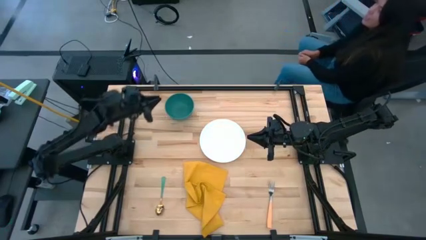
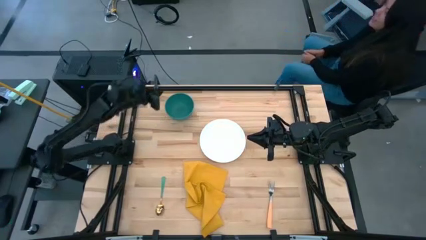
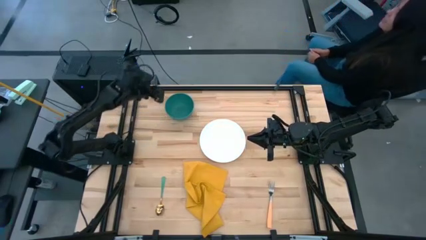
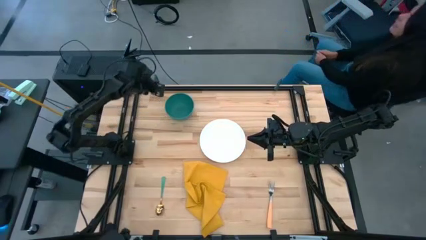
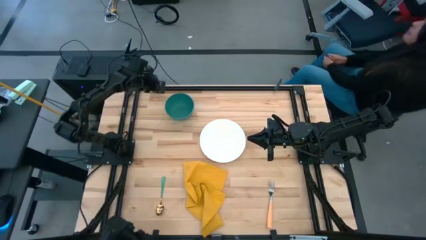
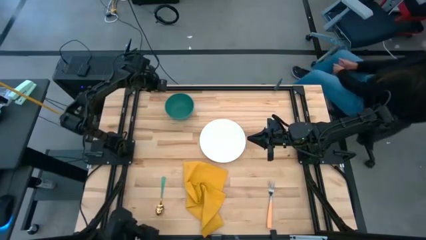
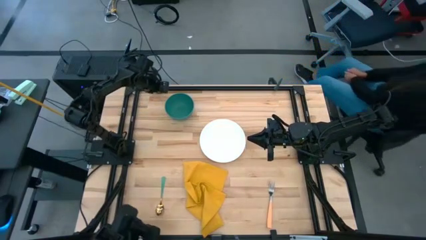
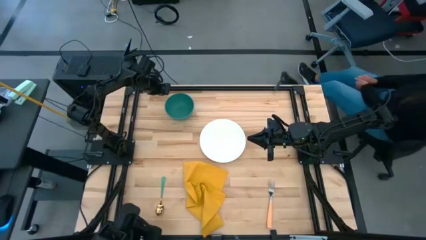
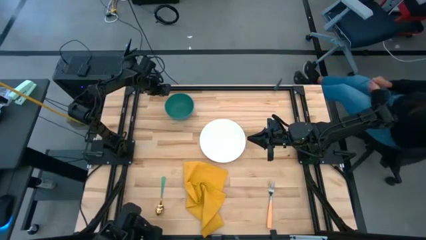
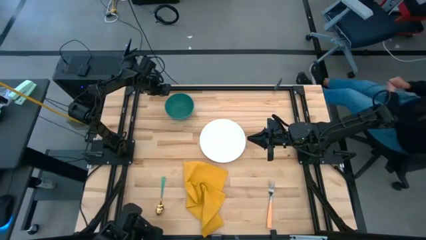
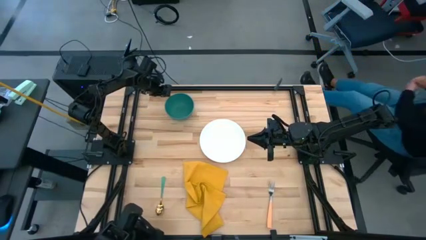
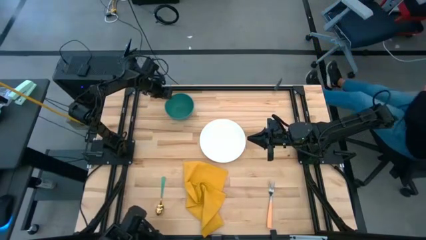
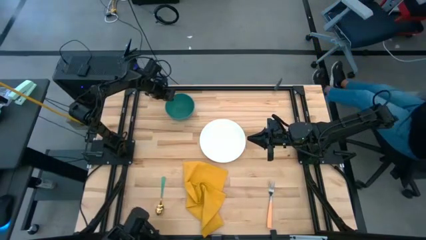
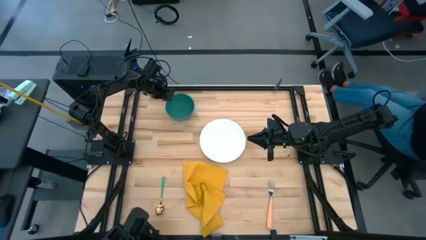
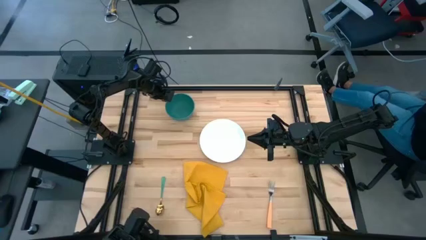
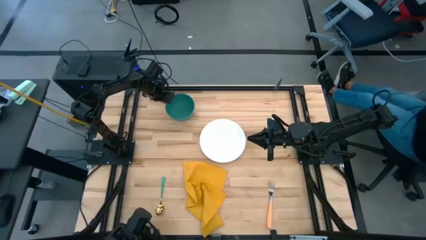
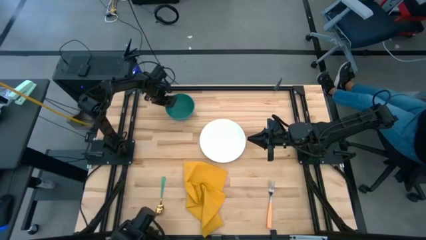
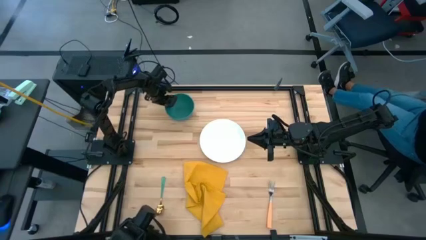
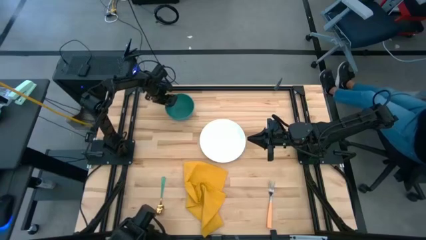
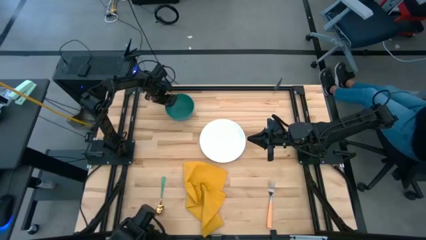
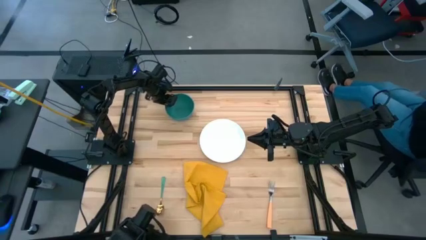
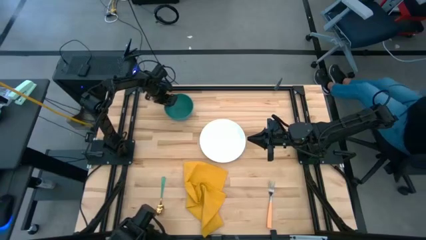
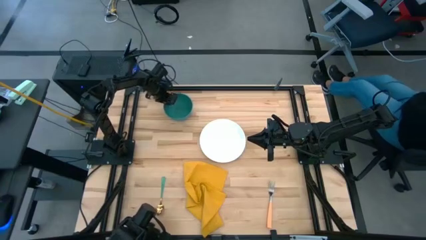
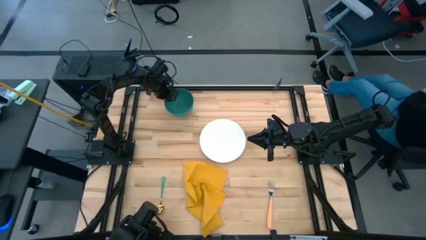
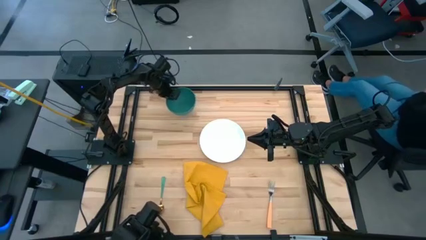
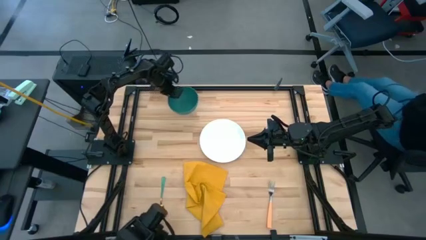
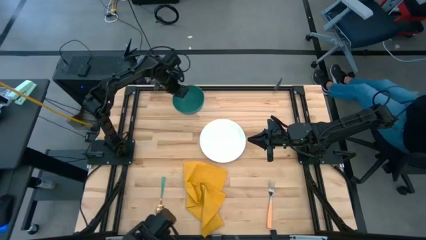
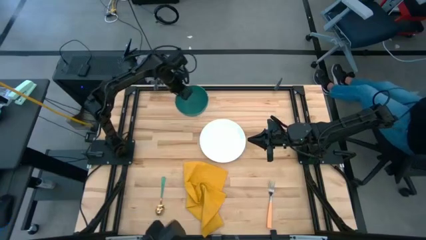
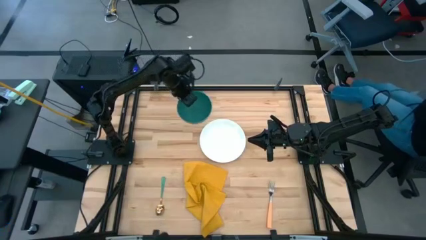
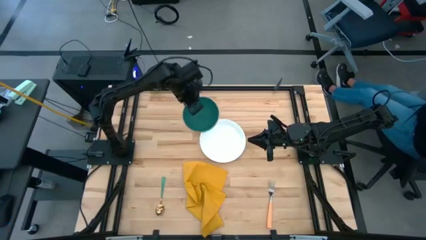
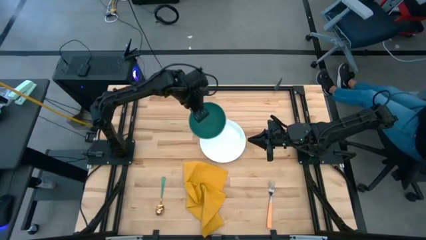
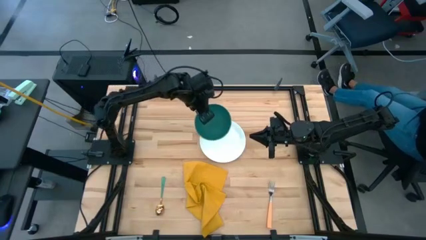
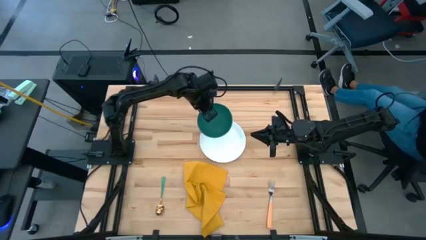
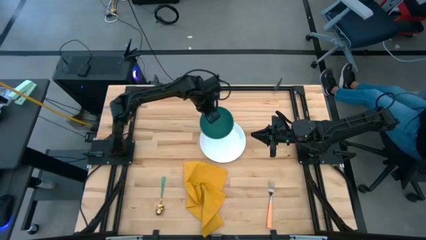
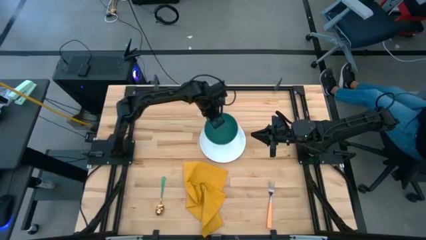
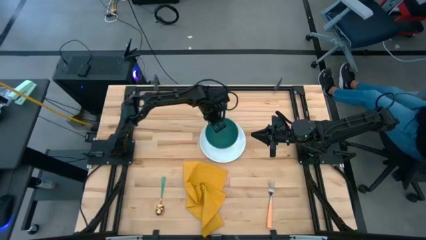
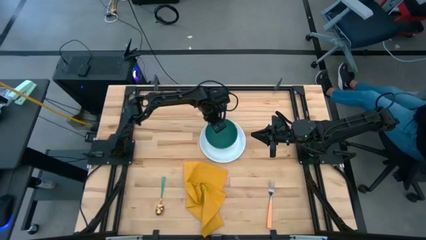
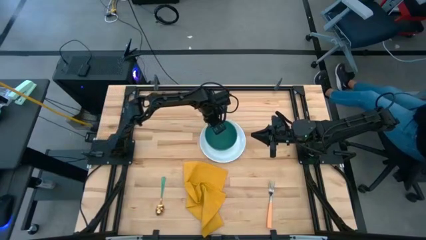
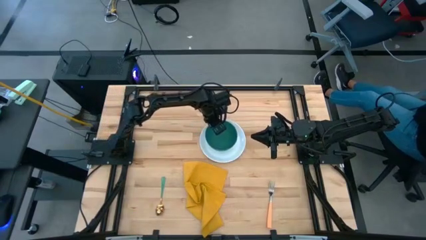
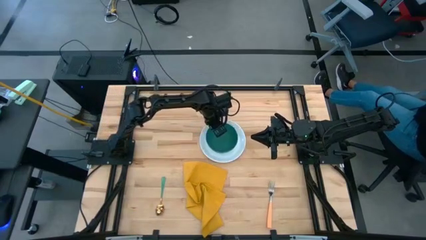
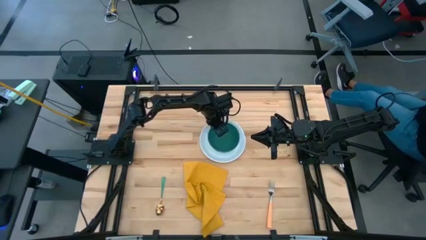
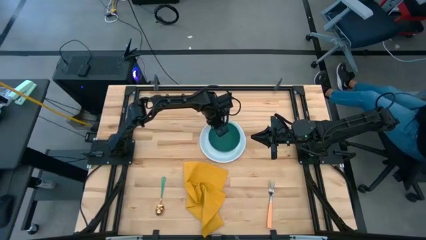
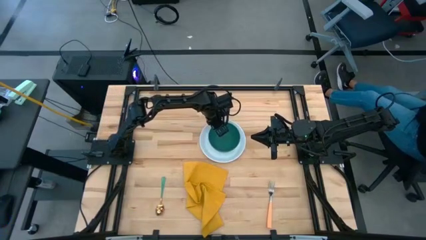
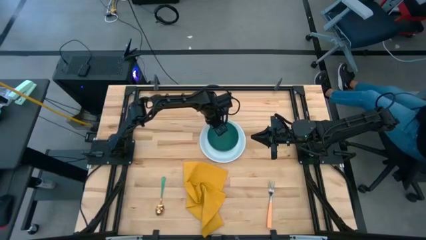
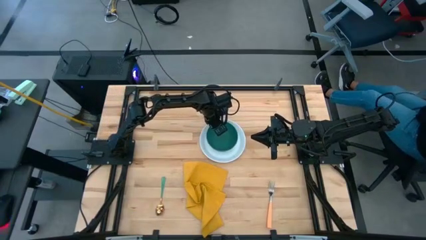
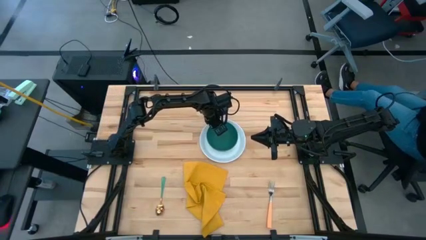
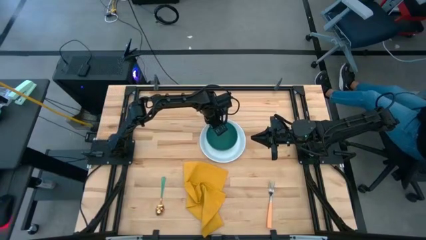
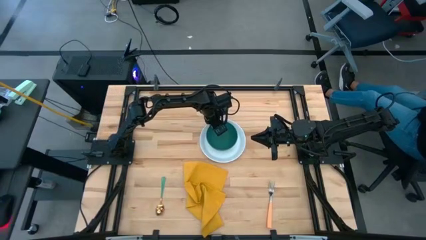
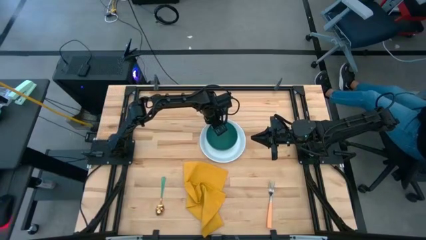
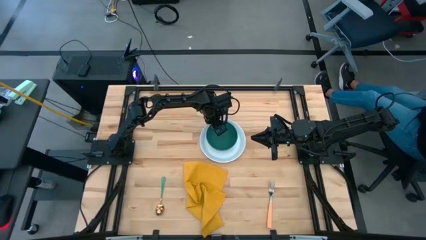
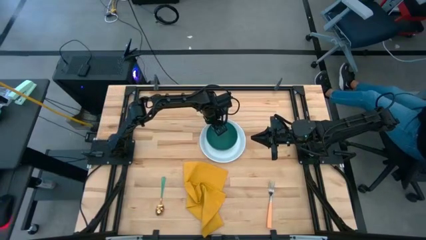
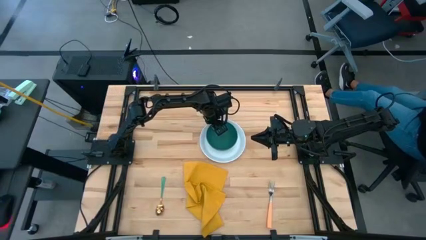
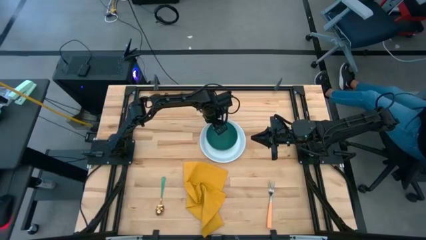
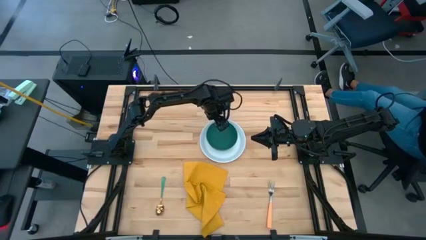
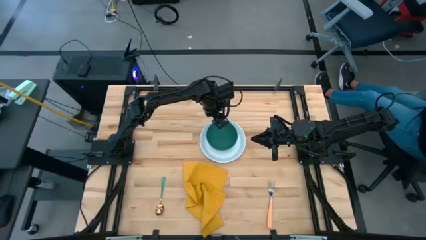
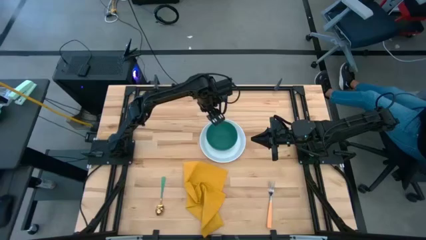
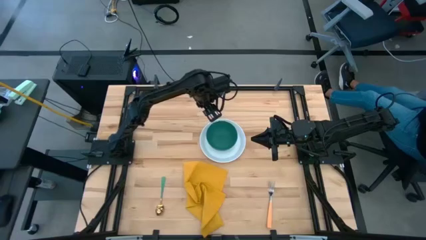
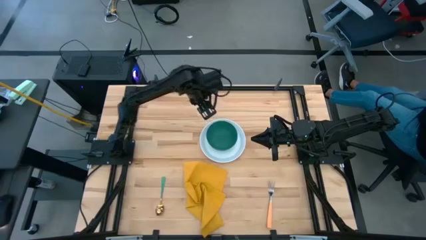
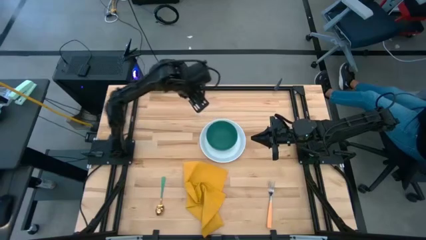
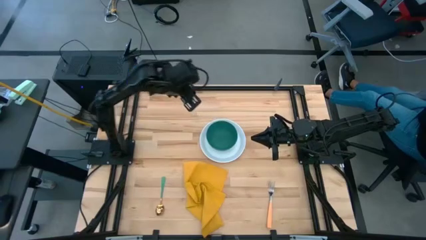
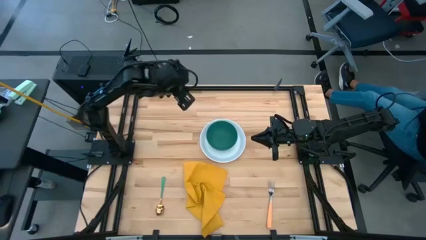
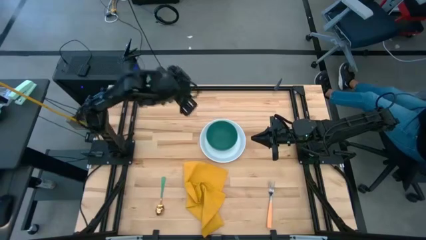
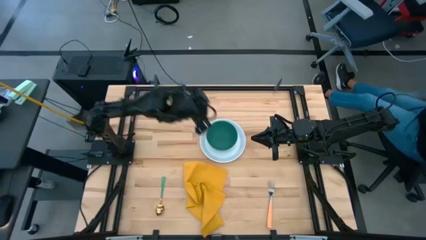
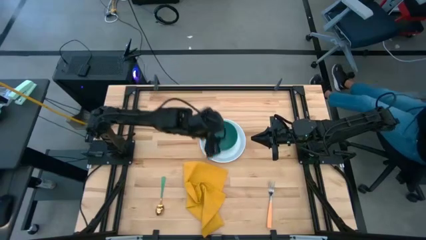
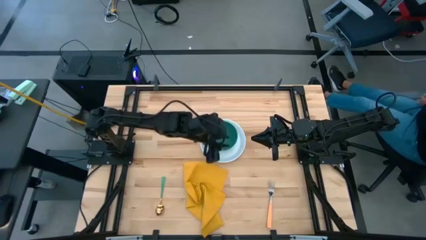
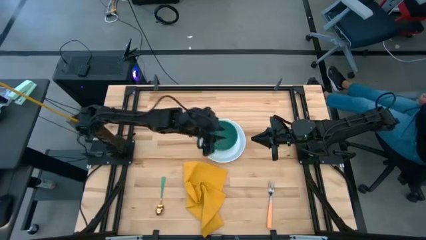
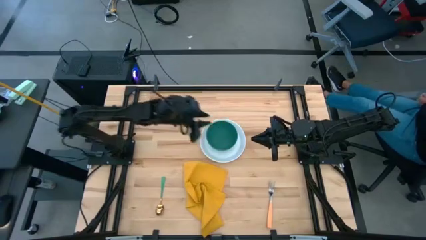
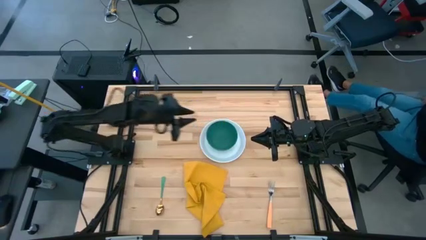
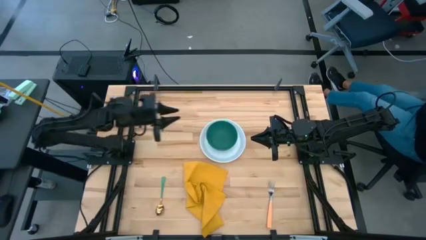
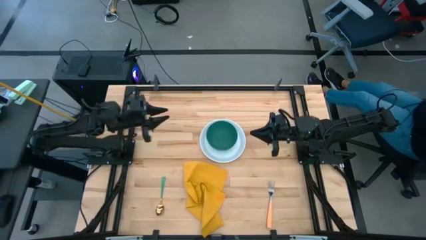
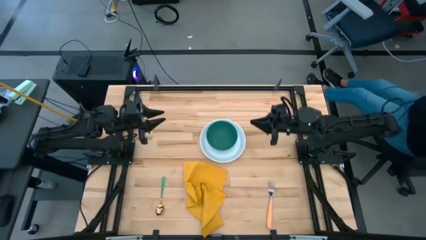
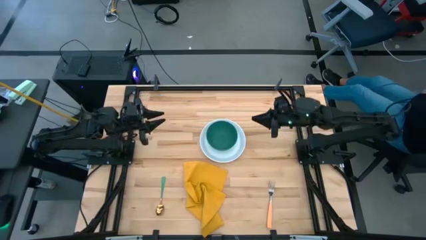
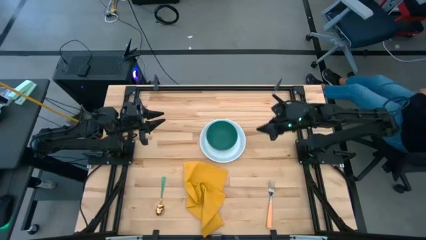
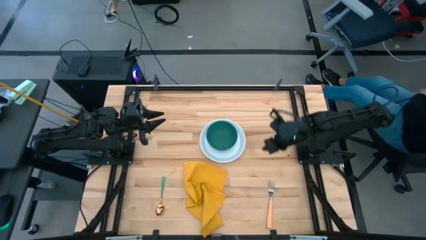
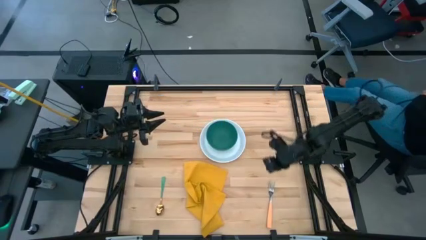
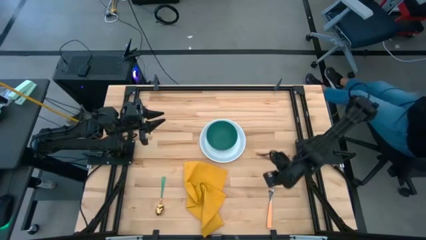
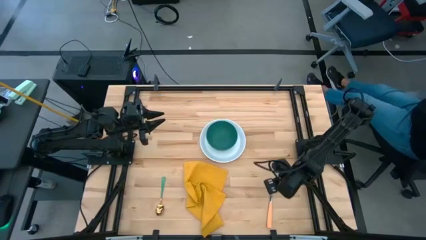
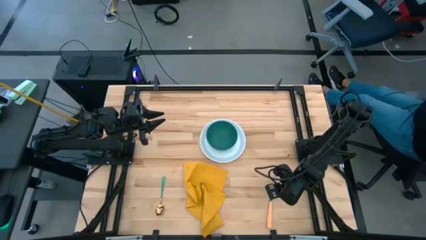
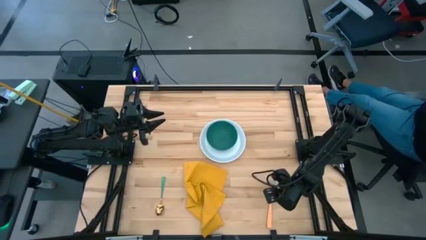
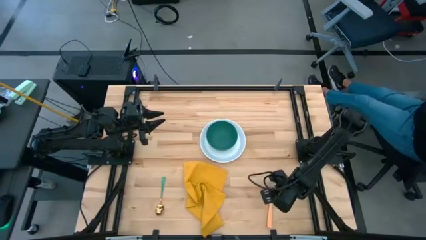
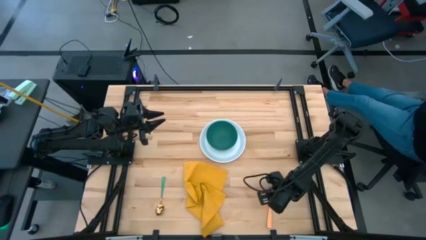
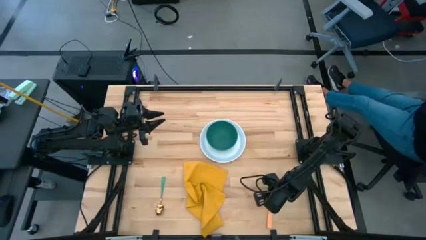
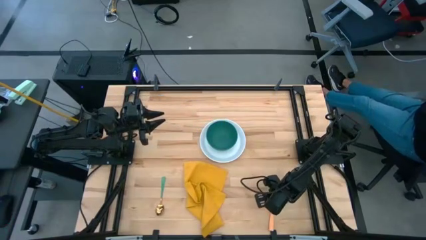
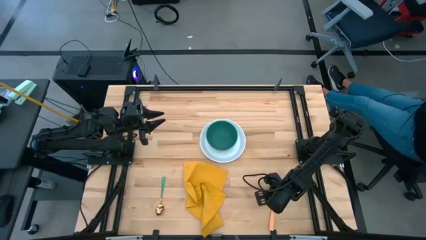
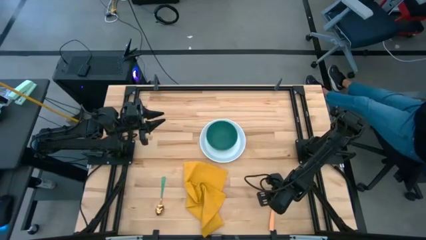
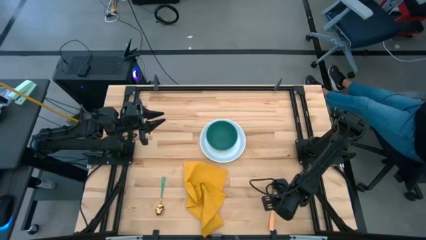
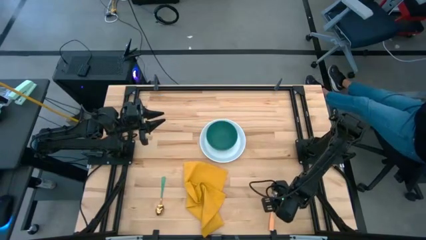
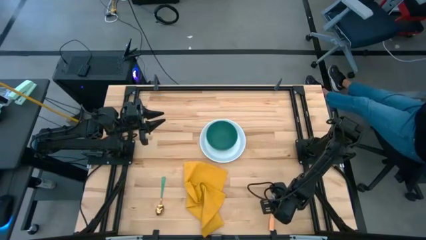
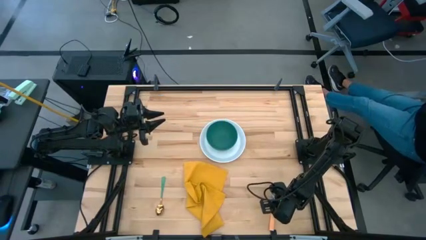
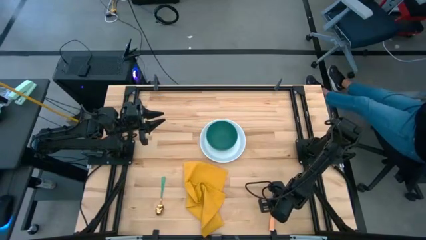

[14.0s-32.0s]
Task: Set table place
Stack the green bowl on top of the white plate
